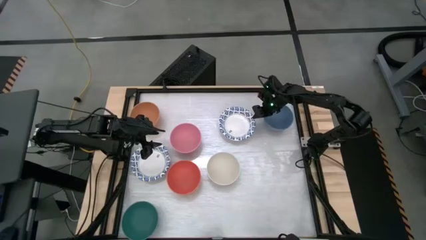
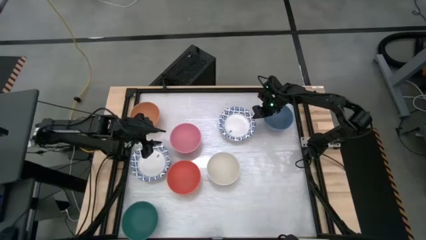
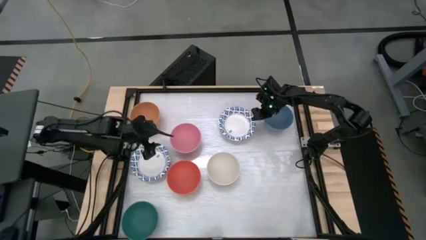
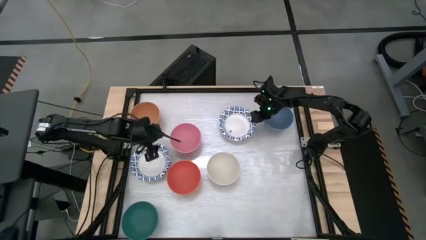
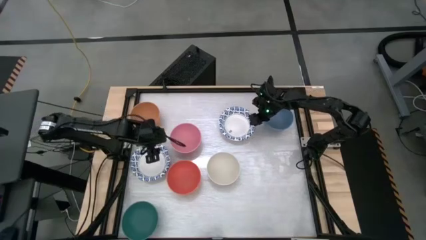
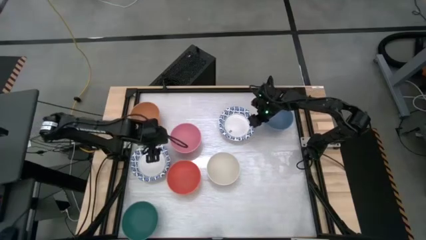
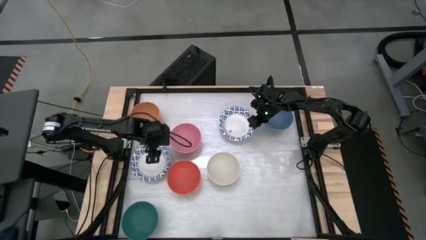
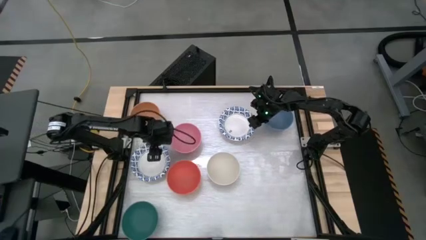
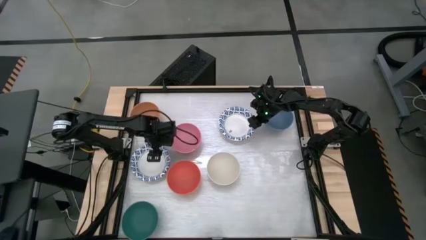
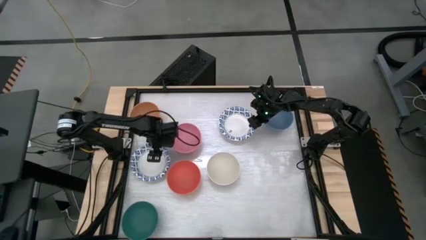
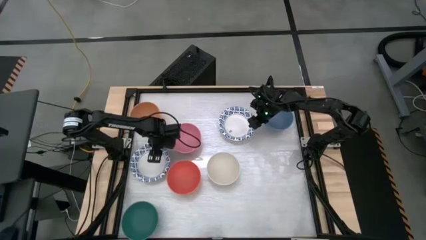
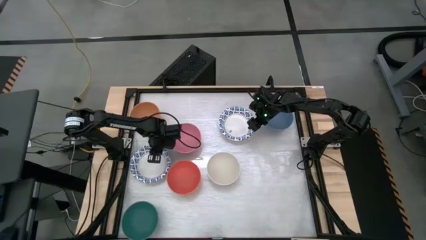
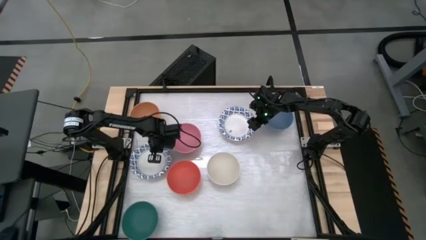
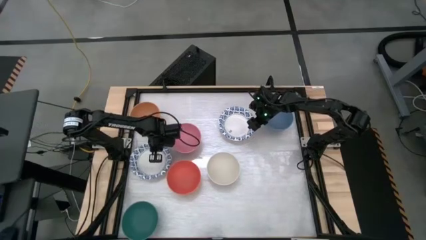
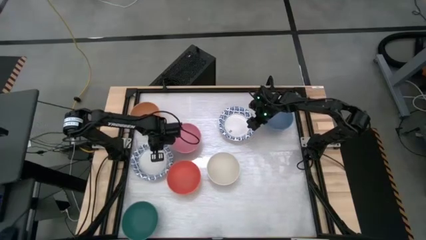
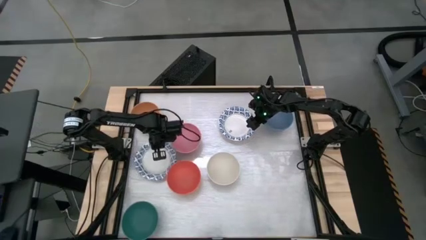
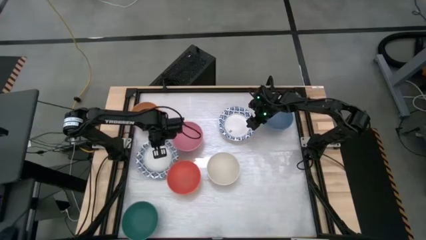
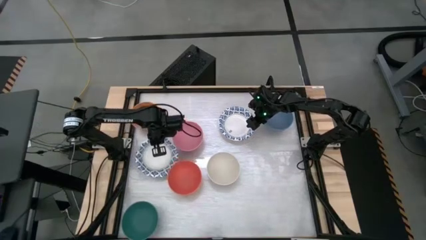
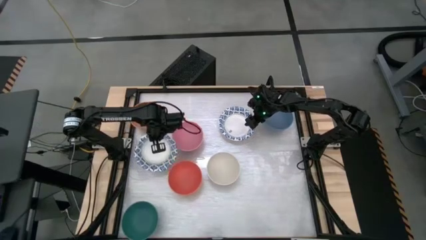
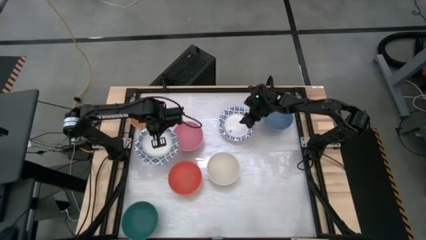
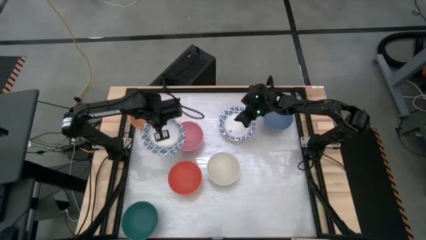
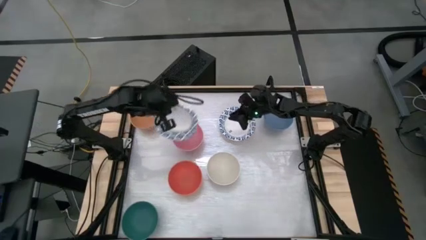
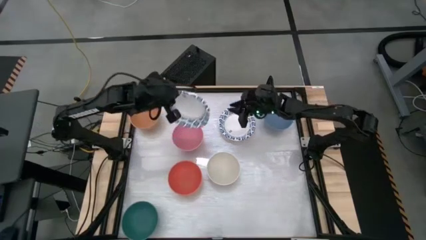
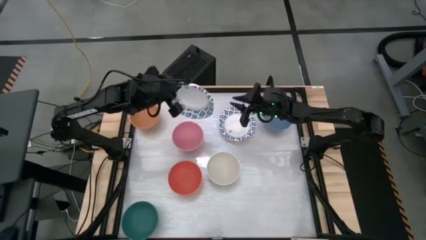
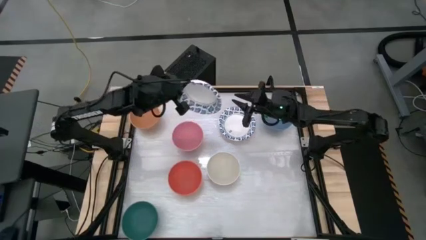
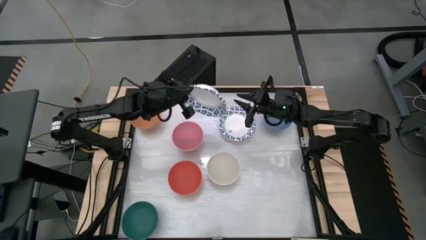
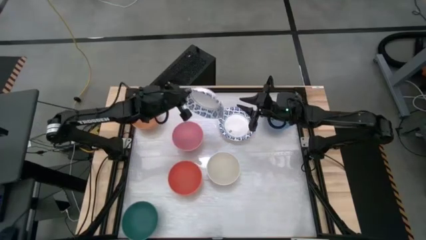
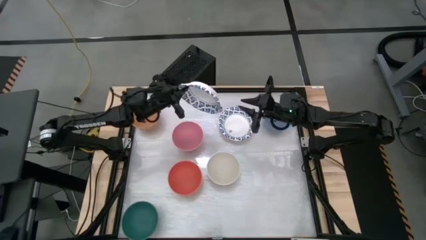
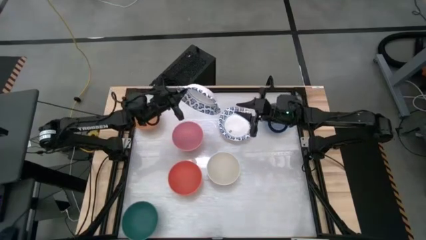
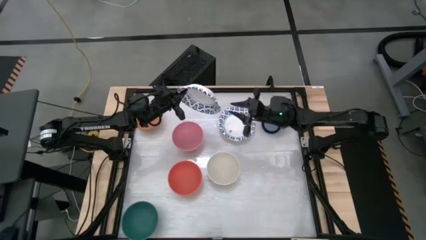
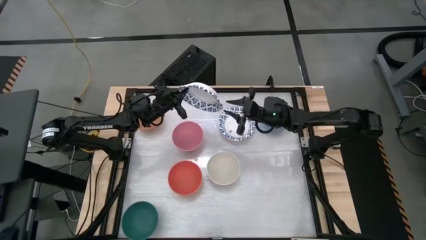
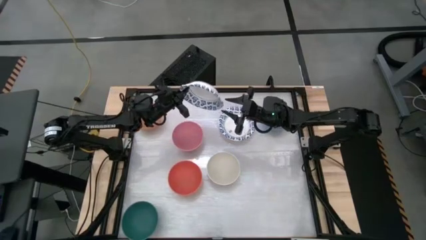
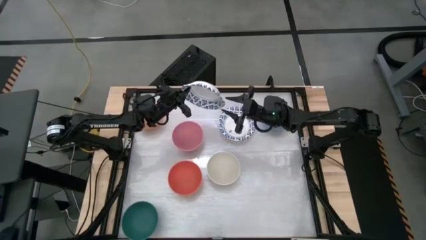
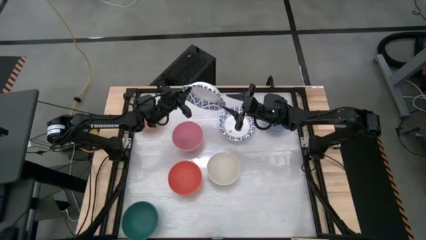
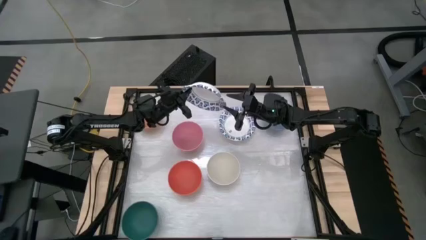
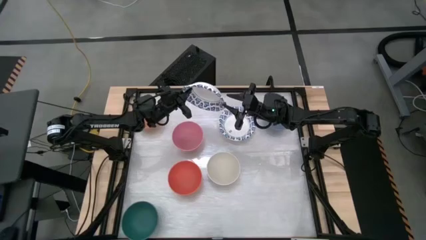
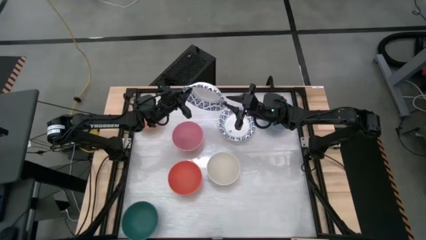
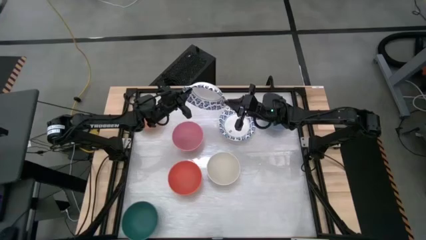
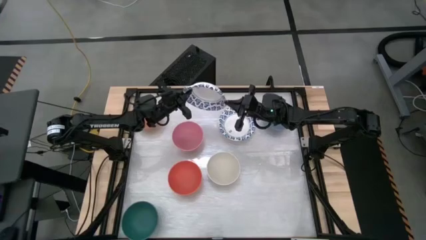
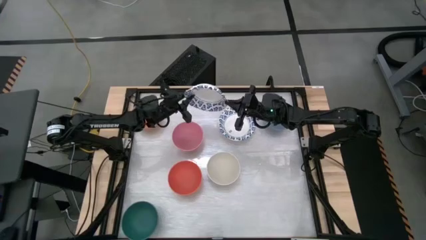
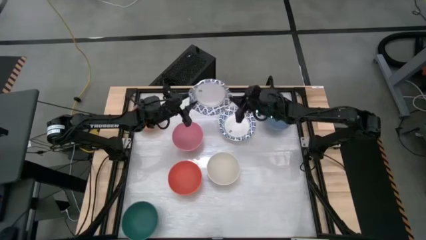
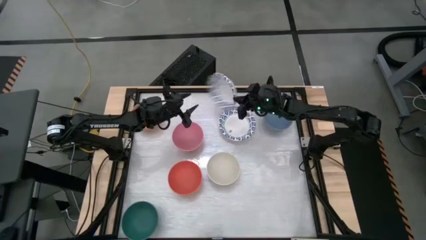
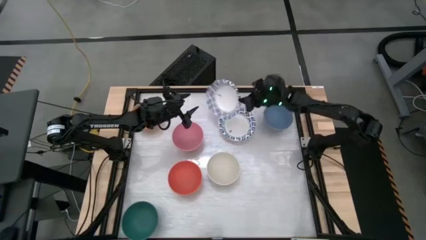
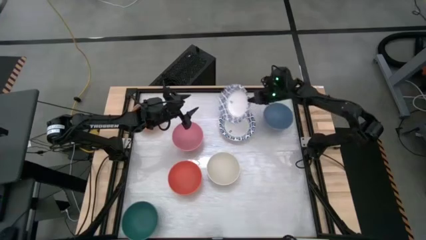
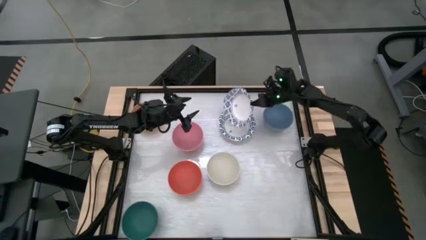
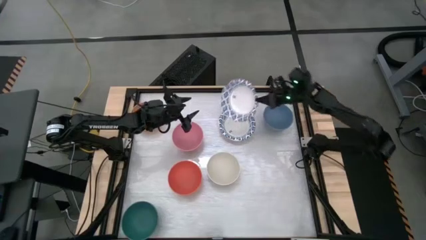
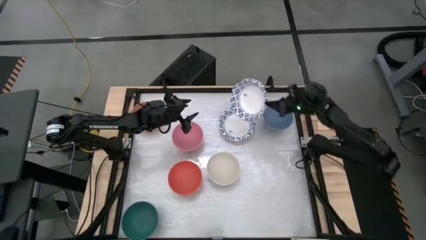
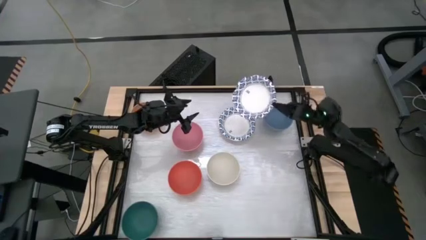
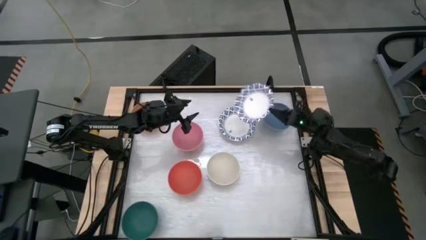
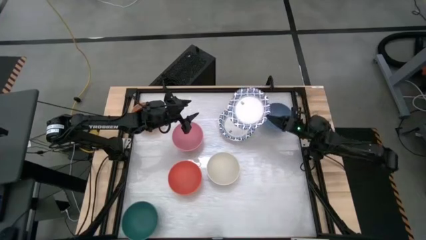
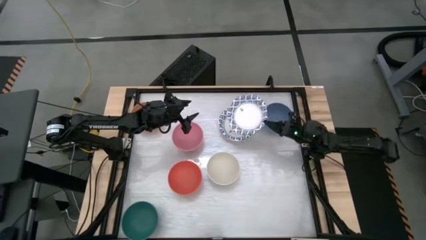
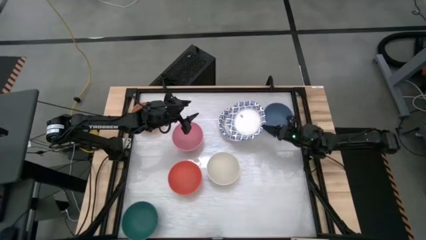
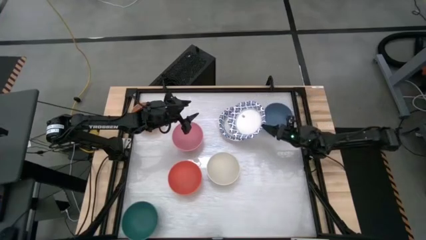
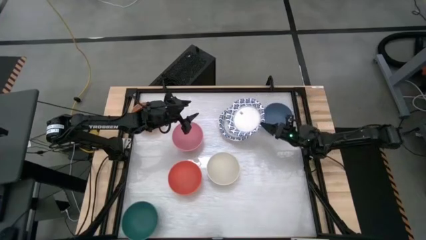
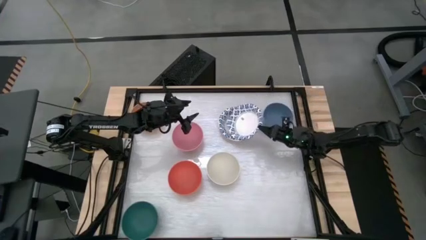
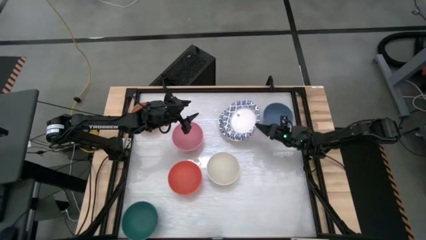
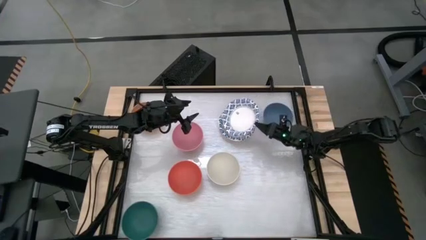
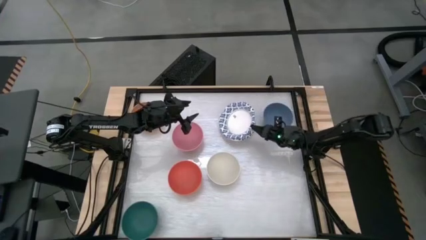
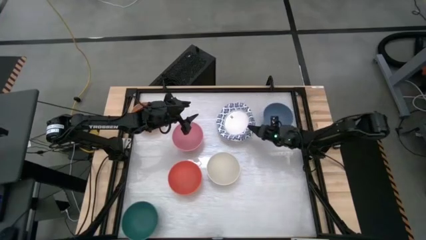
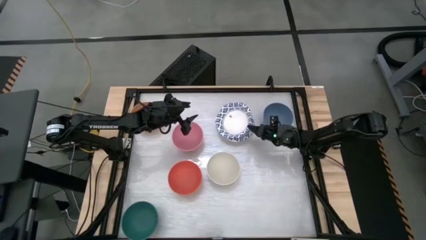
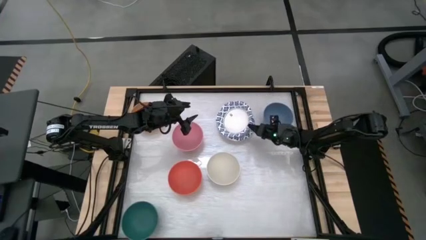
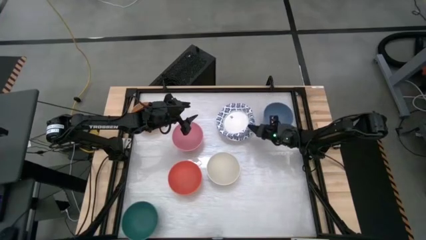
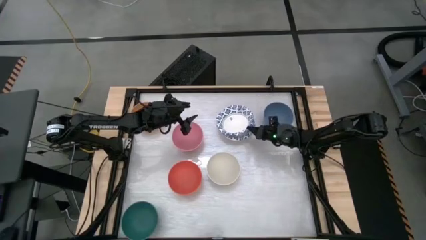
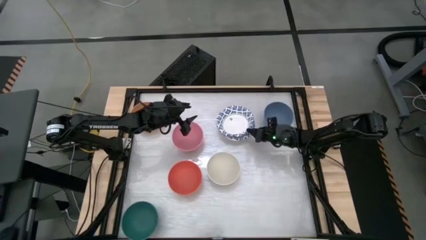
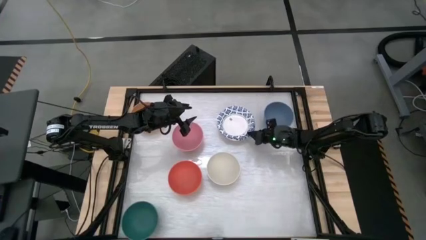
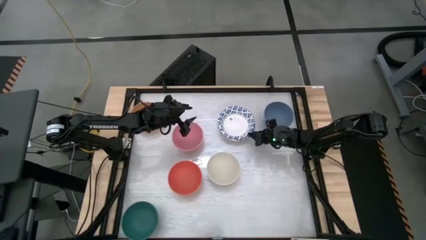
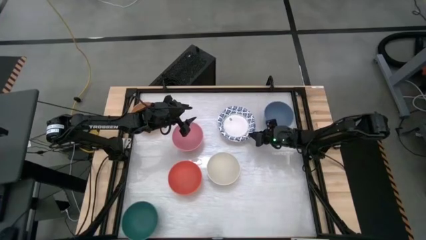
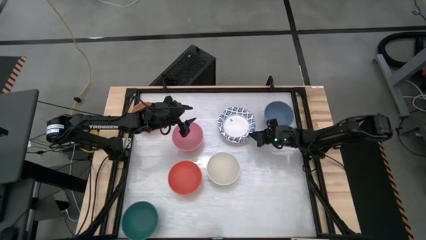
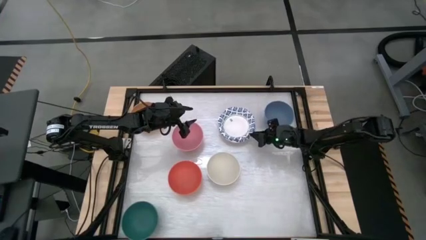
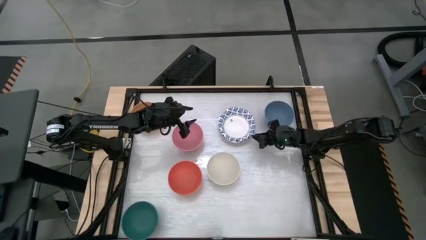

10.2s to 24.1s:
Task: Nest bowls inside each other by size order
Stack the left blue patterned bowl on top of the right blue patterned bowl

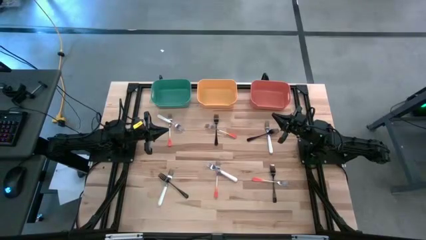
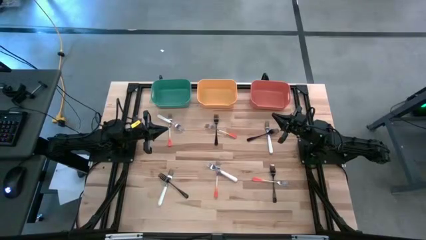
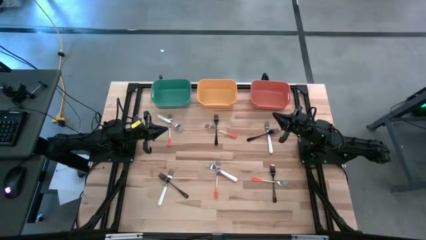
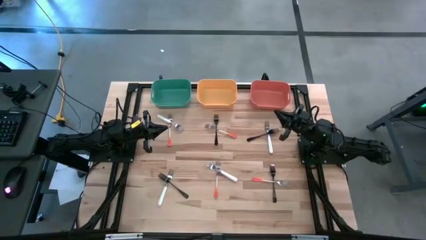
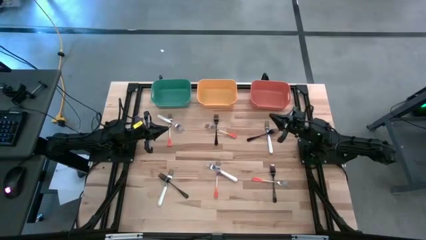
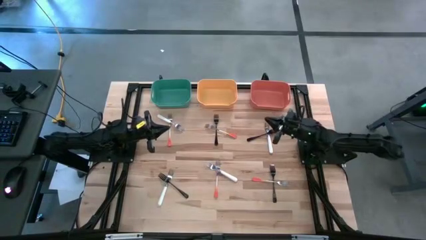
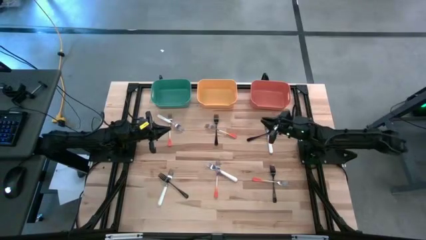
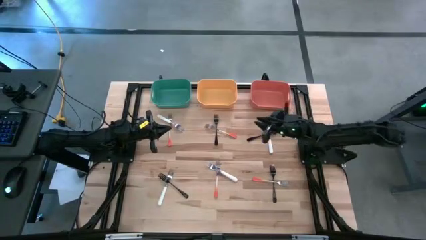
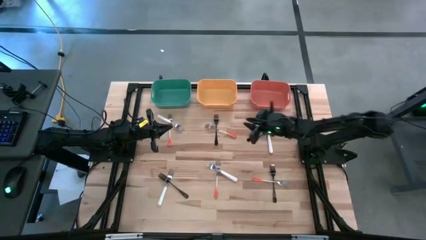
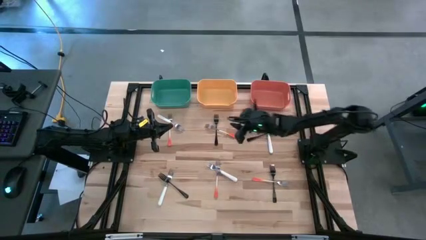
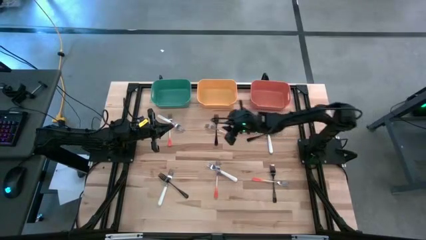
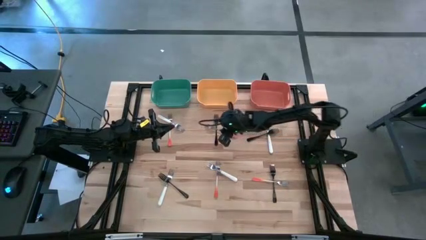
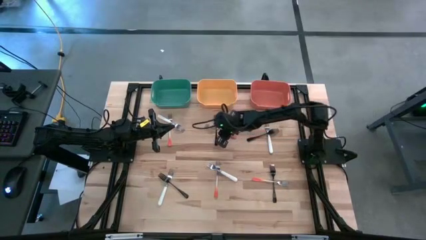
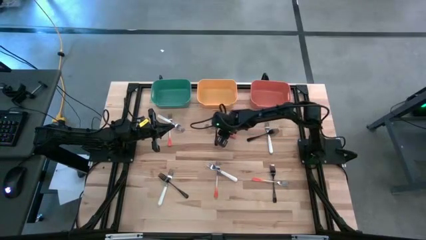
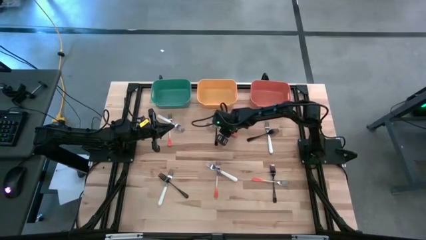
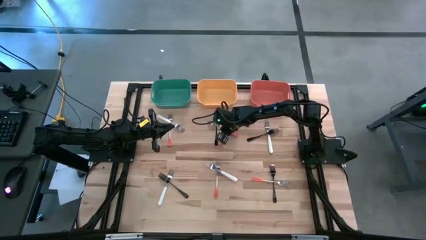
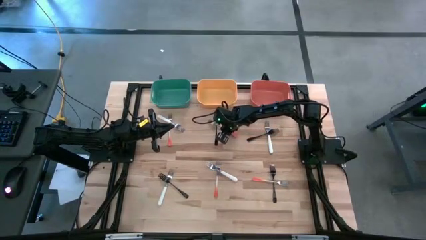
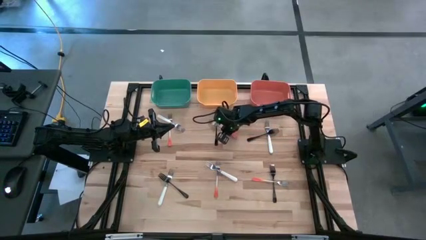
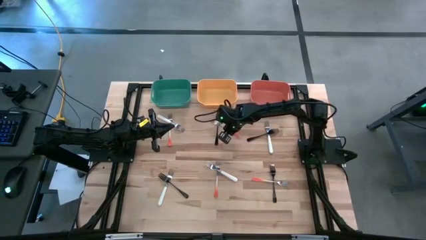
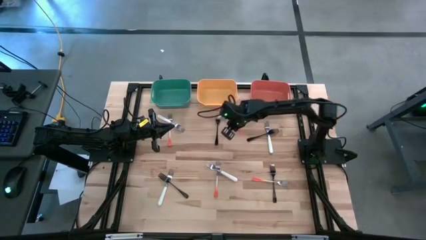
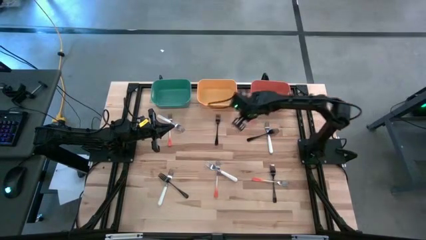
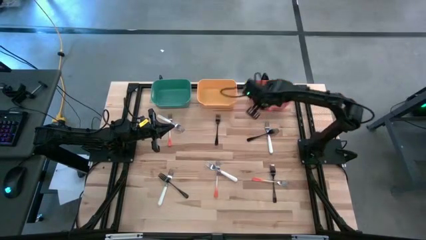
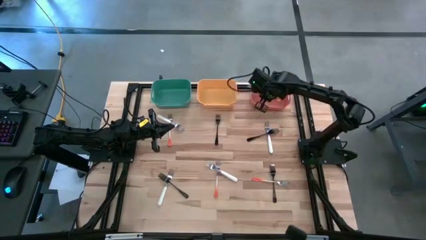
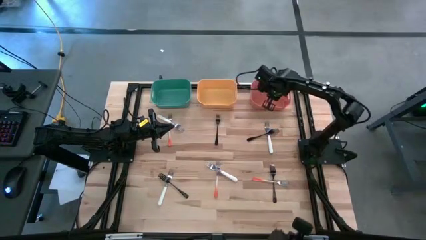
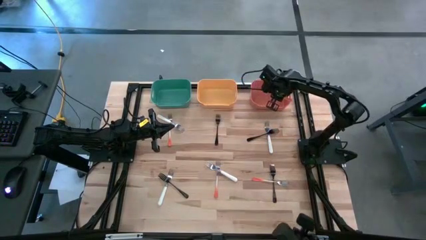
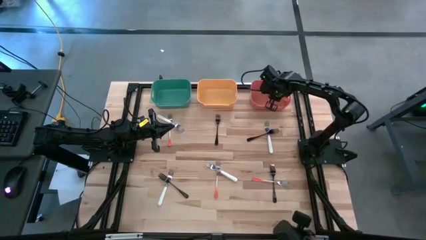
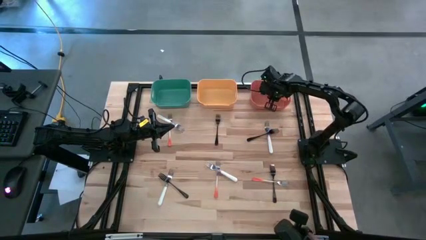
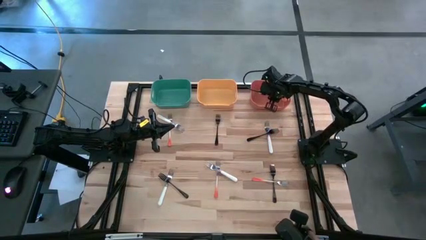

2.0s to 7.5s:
Task: Sort silverware by color (type)
Put the orange fork into the orange bin
